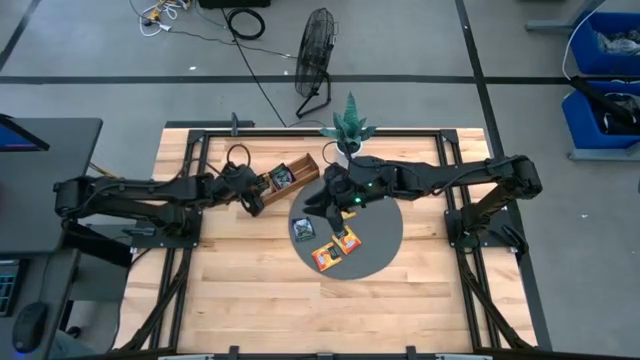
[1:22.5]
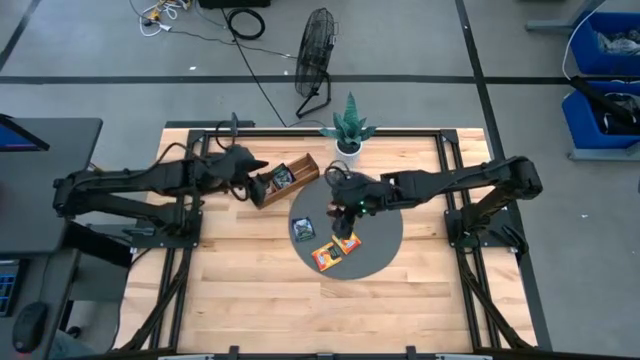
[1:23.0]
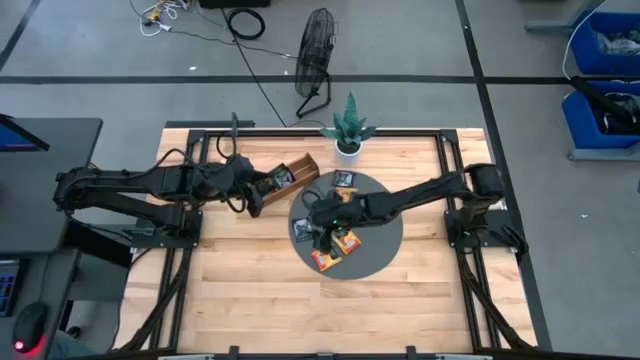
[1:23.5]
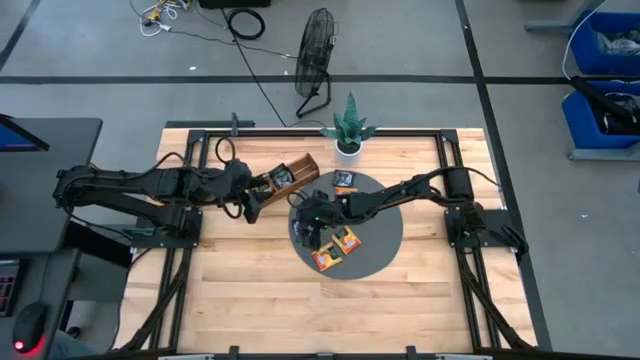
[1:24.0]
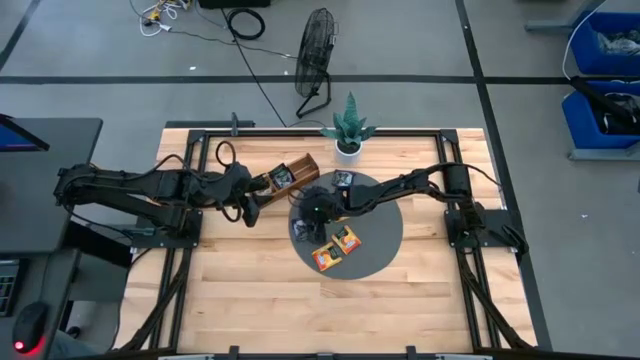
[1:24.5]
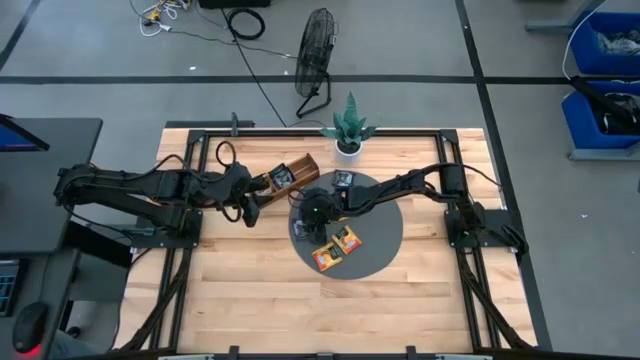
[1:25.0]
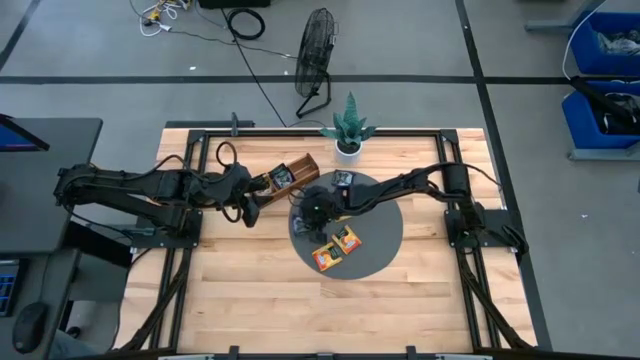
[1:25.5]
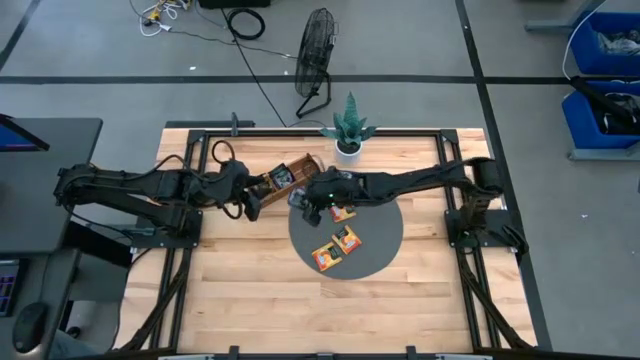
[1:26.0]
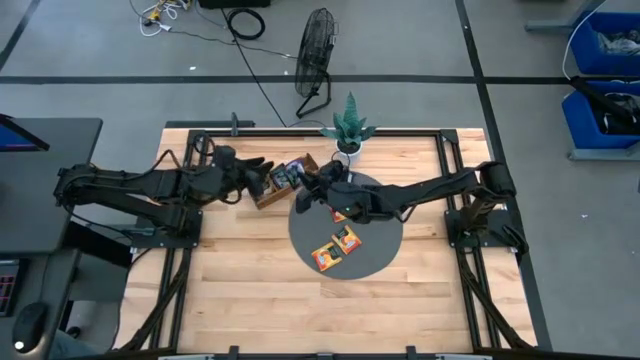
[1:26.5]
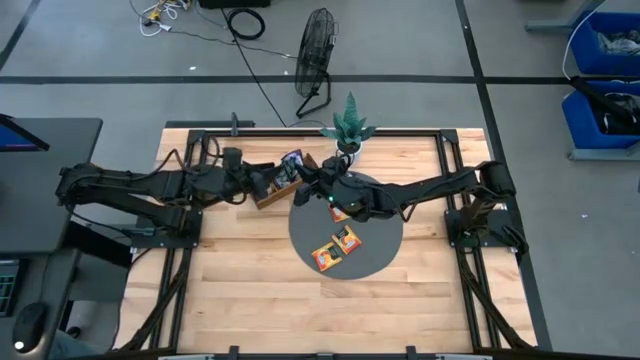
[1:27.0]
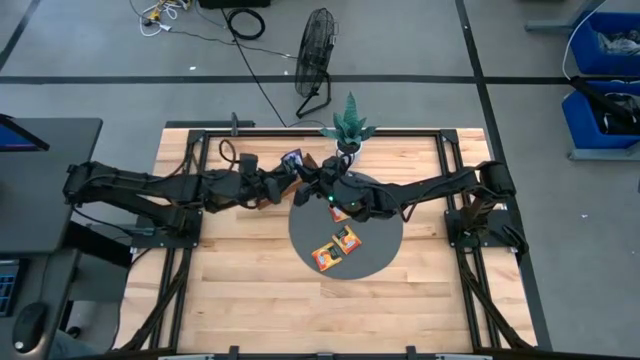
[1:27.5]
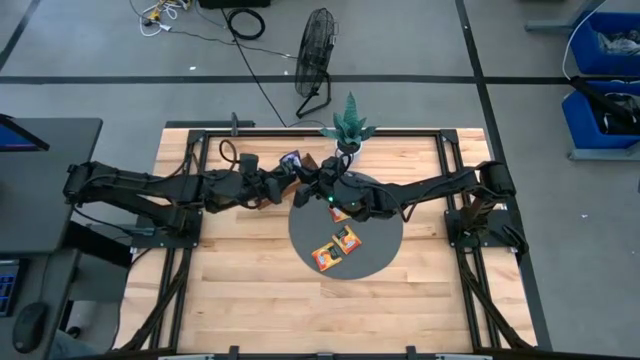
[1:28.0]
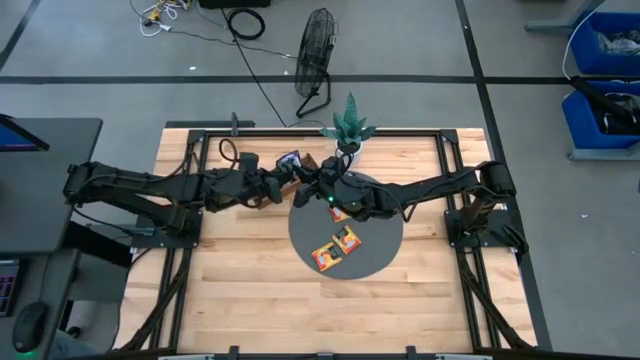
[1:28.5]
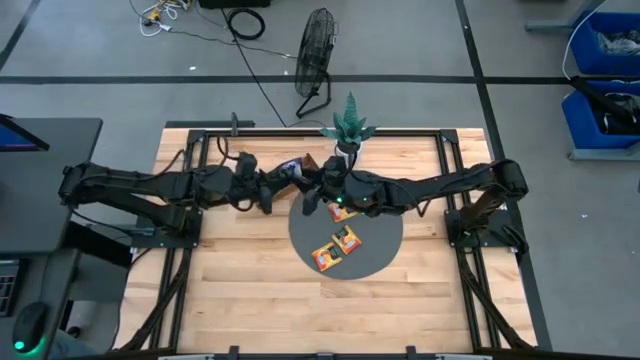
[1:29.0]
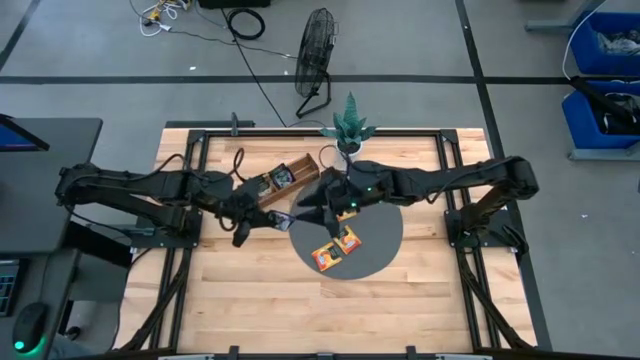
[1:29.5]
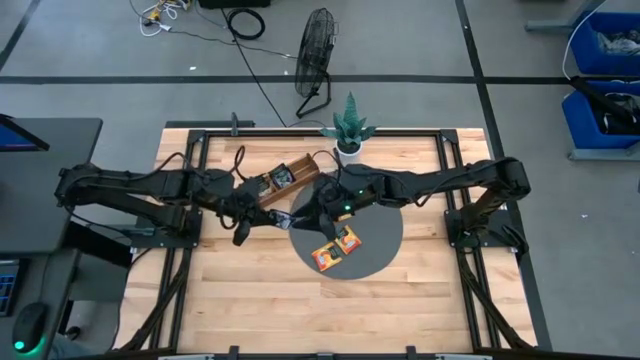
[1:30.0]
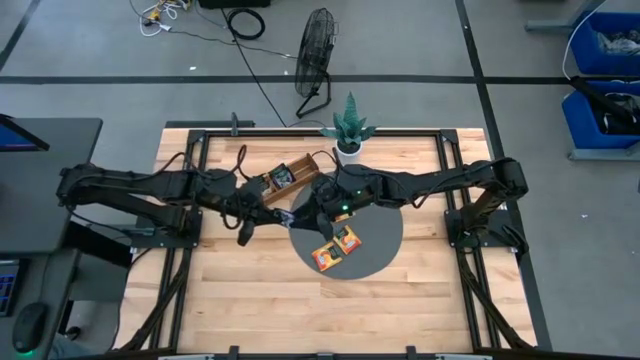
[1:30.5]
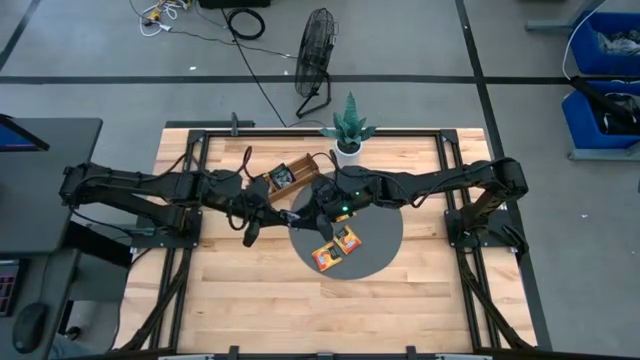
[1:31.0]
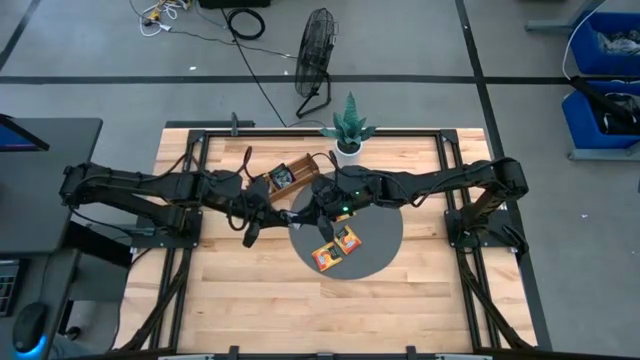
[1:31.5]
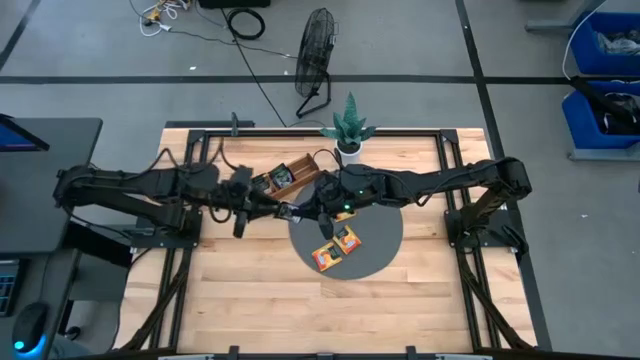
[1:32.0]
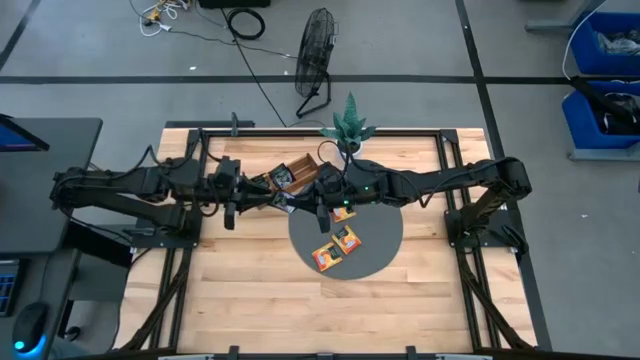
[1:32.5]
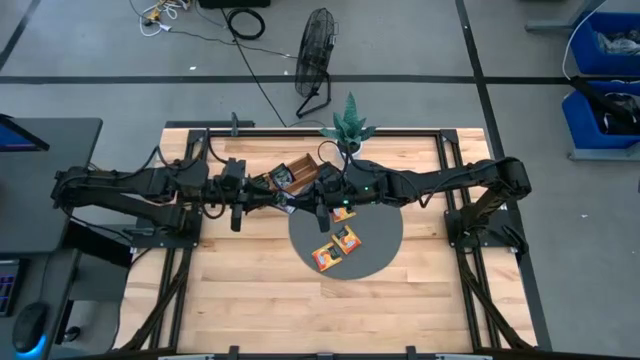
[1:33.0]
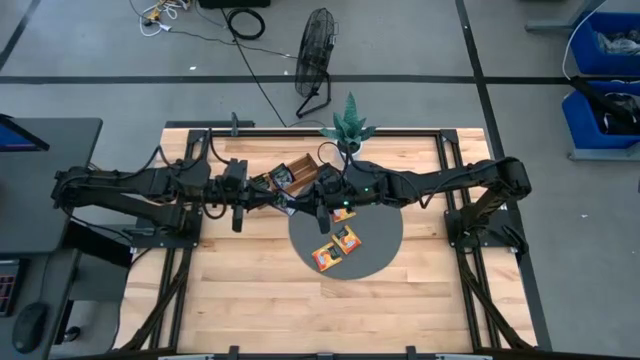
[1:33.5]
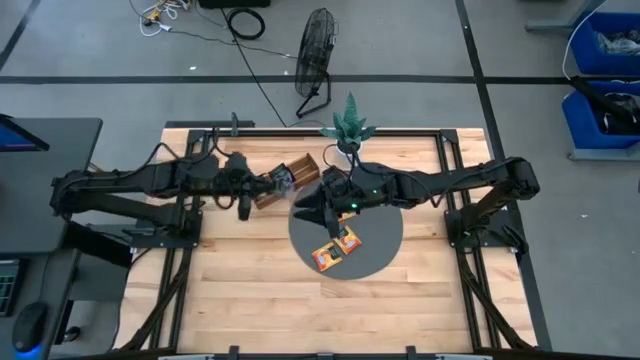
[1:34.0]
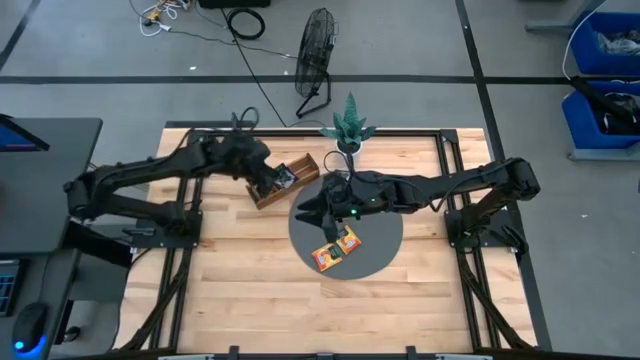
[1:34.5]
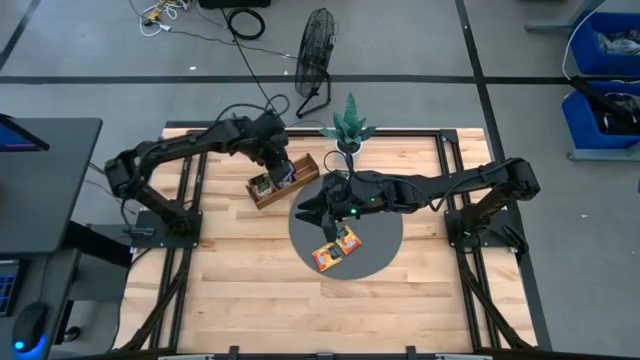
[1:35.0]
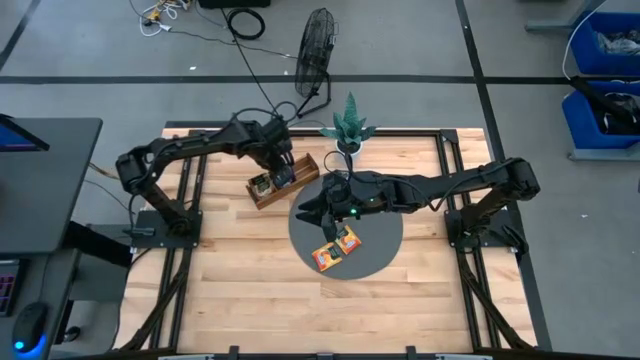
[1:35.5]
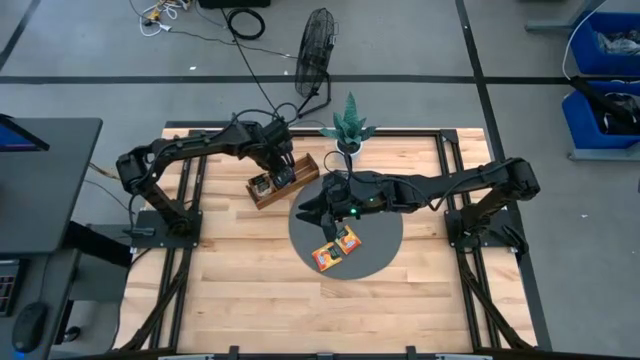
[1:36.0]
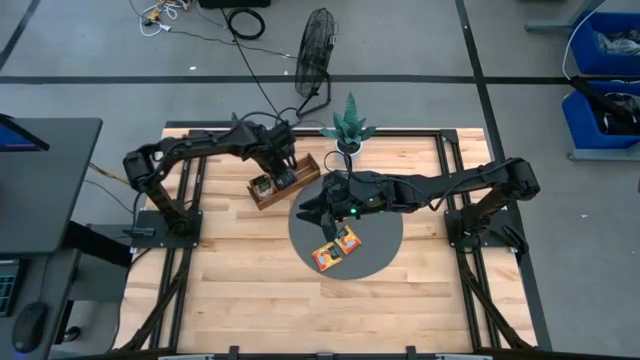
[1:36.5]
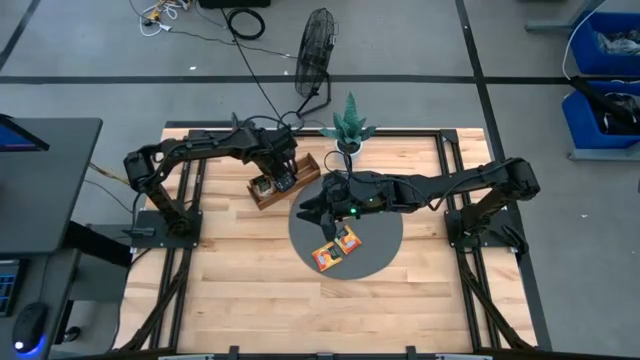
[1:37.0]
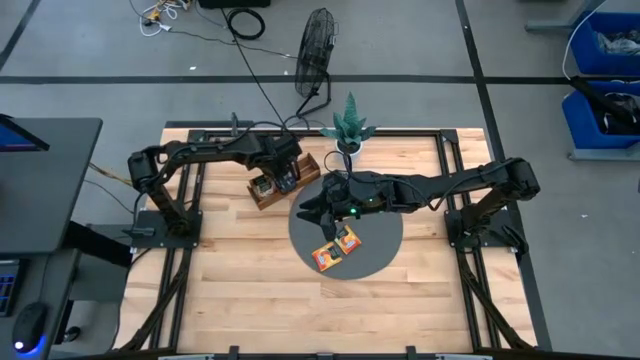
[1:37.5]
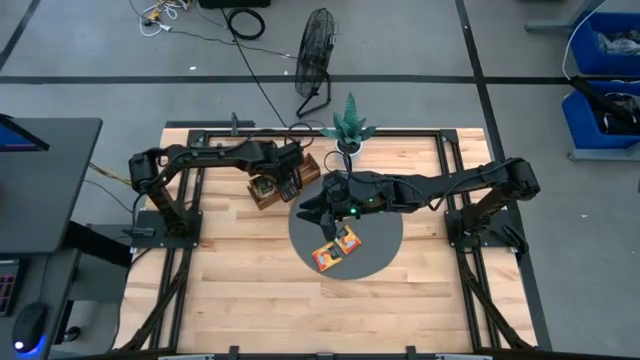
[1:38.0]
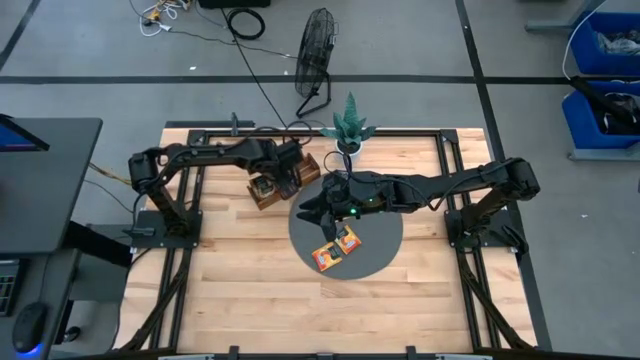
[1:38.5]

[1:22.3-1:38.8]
Task: Pick & Place Tea
Put the purple tea bag into the middle section of the wooden organizer

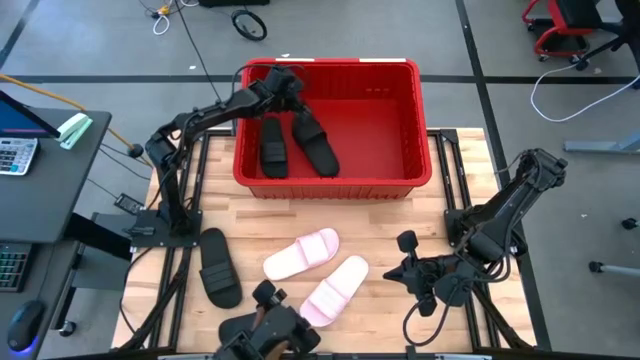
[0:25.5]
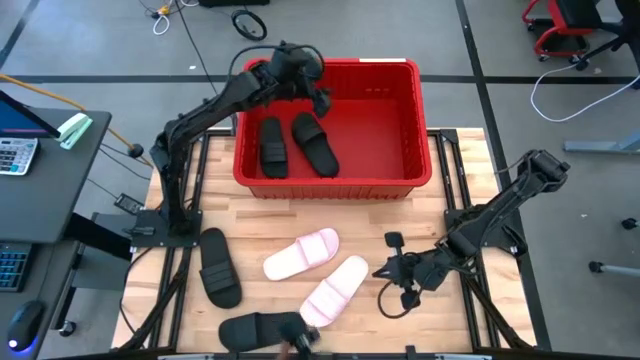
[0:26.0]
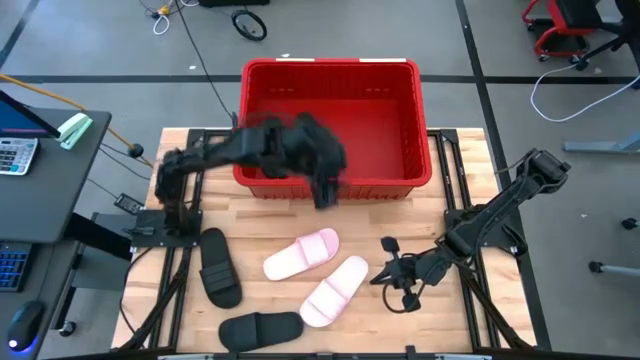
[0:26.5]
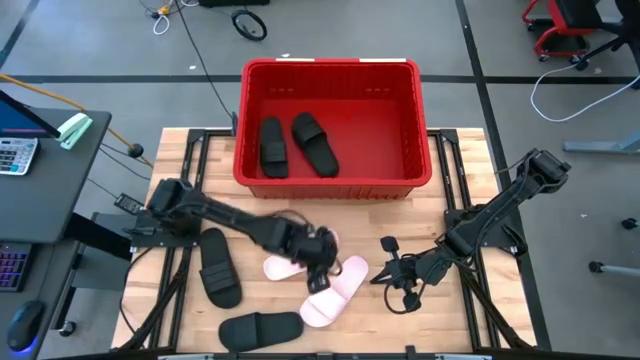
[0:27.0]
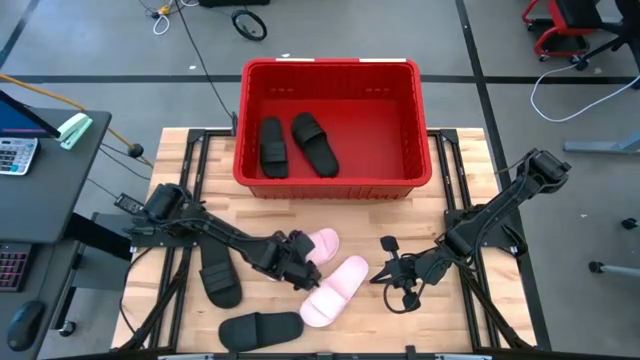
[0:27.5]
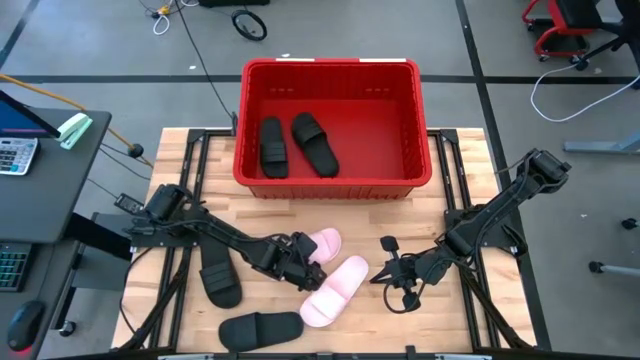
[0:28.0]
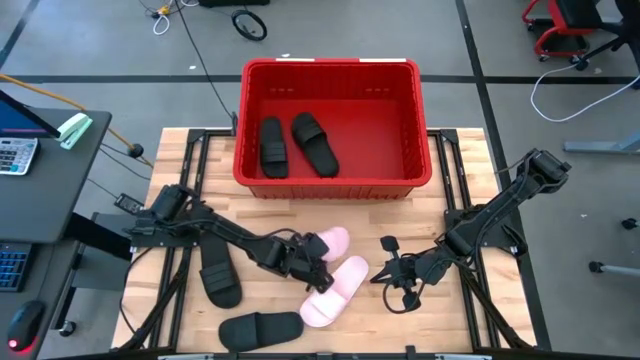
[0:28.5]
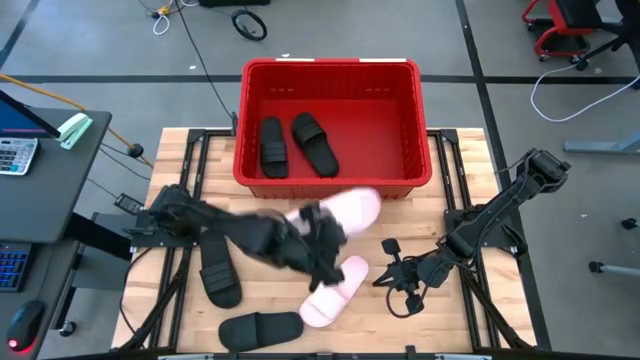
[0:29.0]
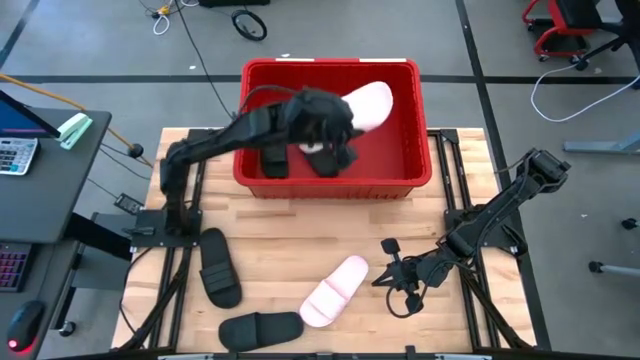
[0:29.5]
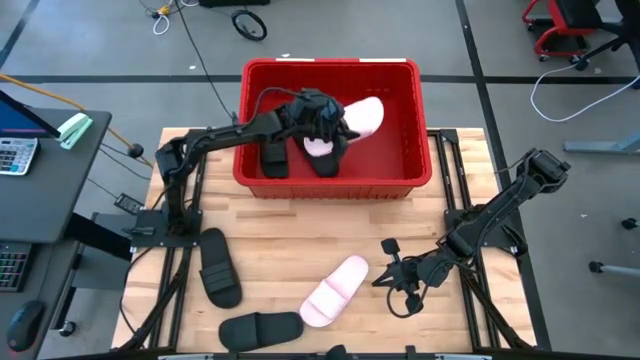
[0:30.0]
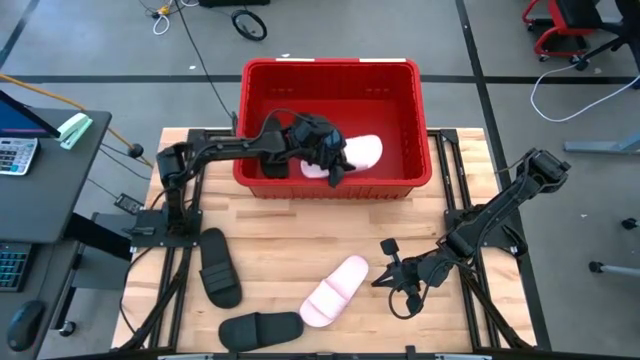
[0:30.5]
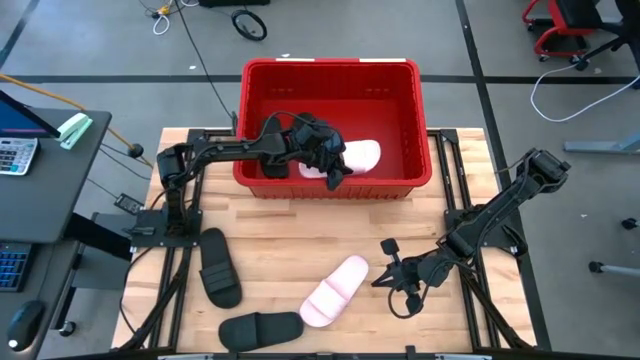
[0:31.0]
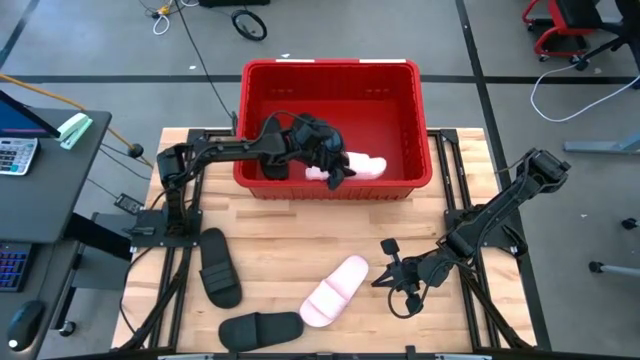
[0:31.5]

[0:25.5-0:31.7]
Task: Pick and place slides into bin
Put the top pink slide into the red bin
